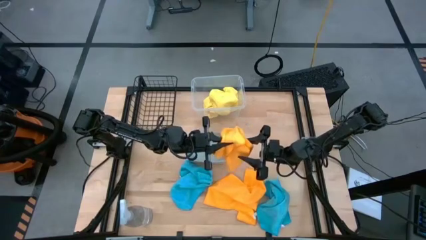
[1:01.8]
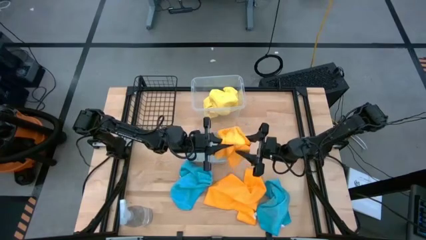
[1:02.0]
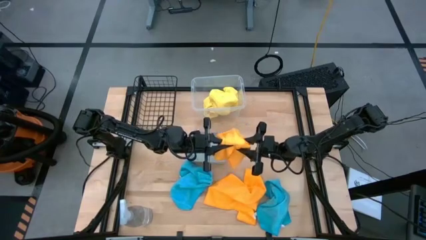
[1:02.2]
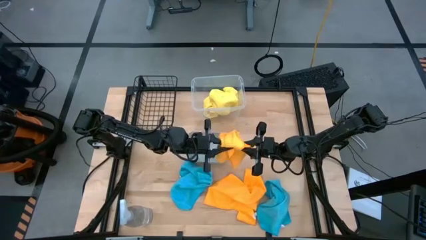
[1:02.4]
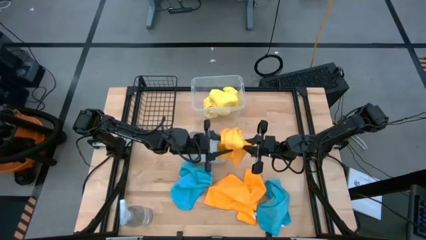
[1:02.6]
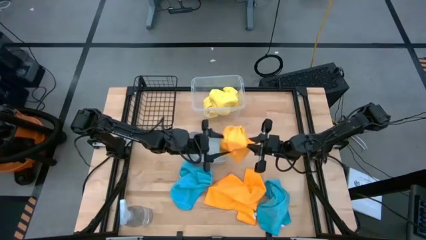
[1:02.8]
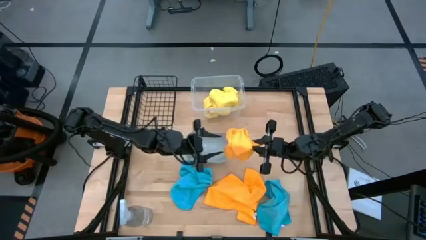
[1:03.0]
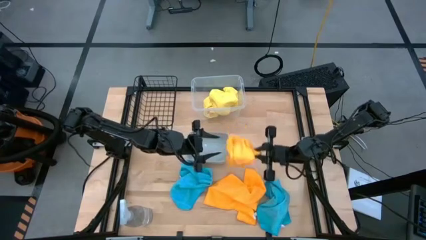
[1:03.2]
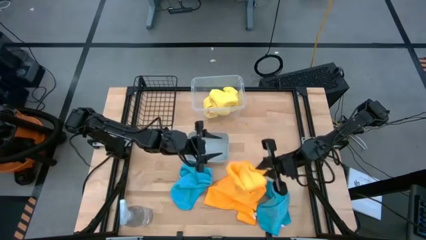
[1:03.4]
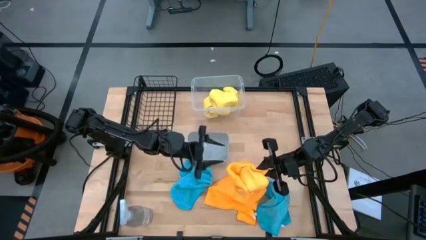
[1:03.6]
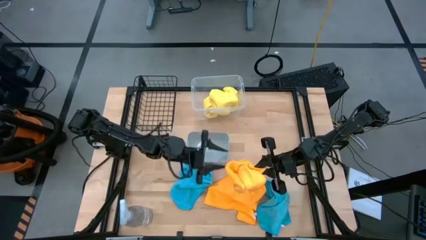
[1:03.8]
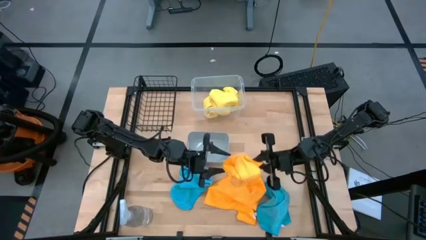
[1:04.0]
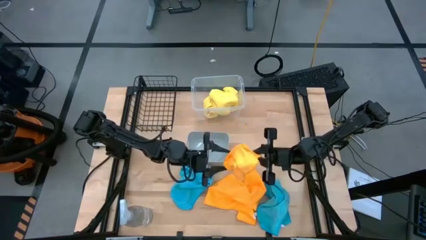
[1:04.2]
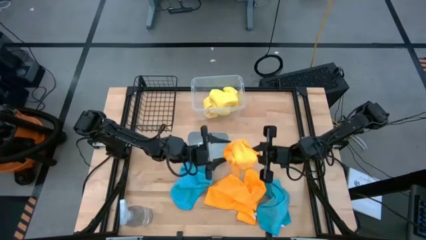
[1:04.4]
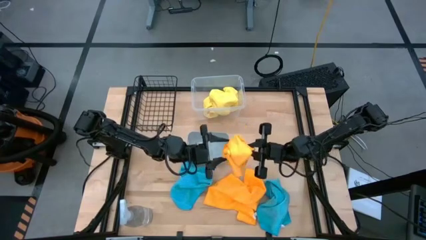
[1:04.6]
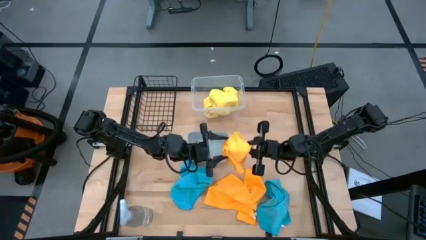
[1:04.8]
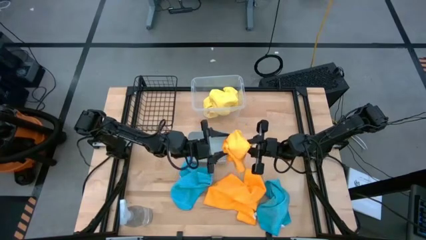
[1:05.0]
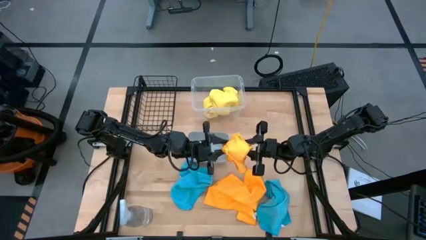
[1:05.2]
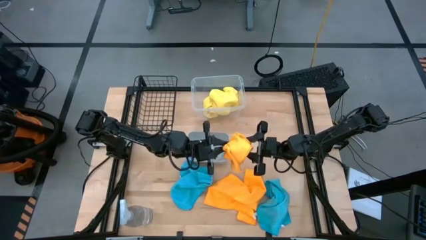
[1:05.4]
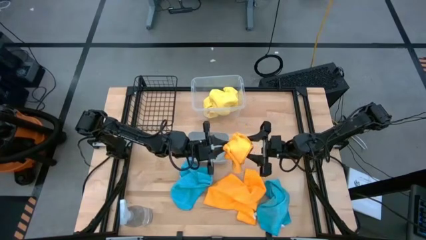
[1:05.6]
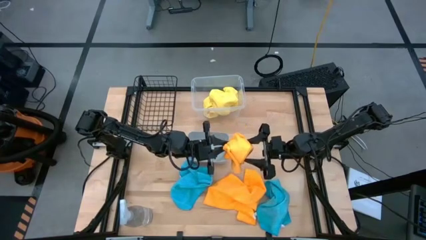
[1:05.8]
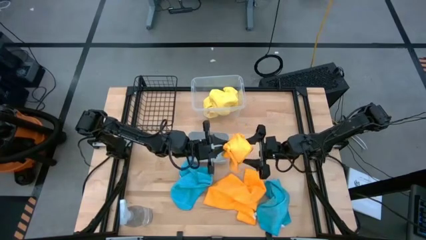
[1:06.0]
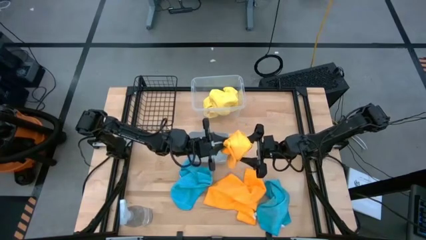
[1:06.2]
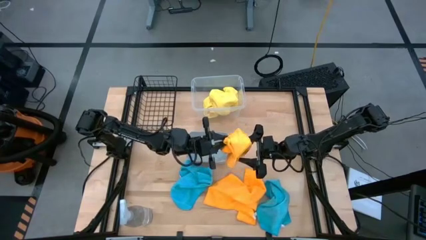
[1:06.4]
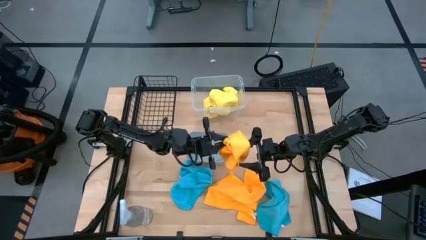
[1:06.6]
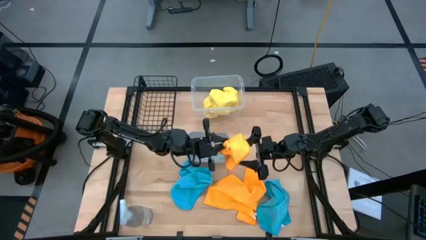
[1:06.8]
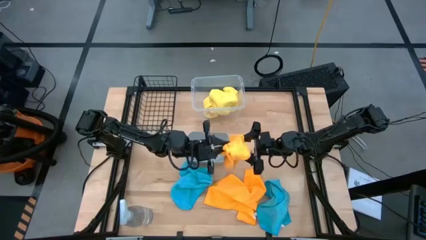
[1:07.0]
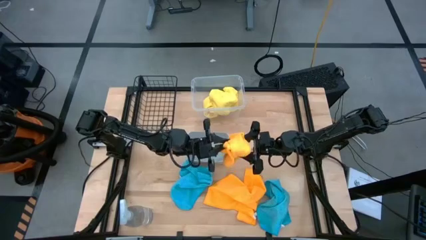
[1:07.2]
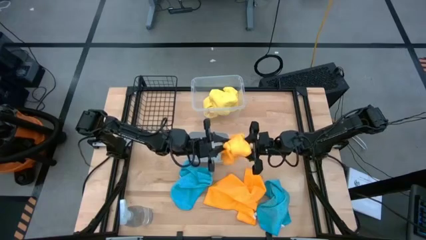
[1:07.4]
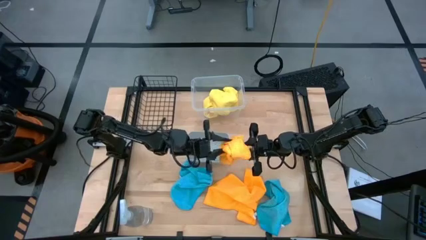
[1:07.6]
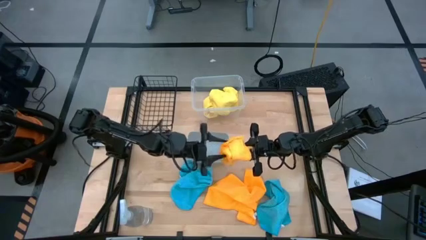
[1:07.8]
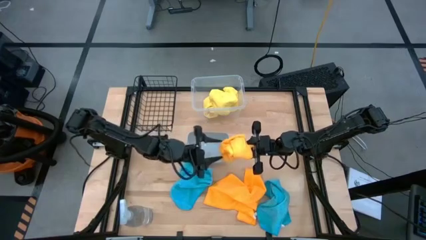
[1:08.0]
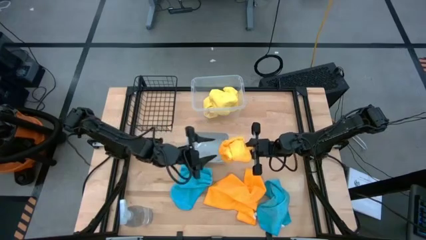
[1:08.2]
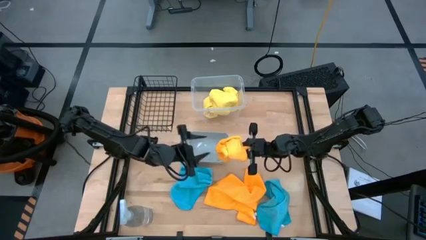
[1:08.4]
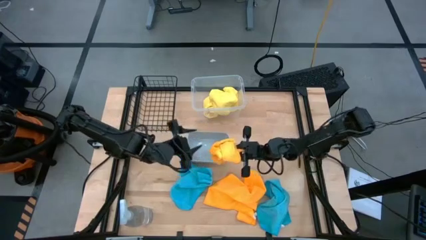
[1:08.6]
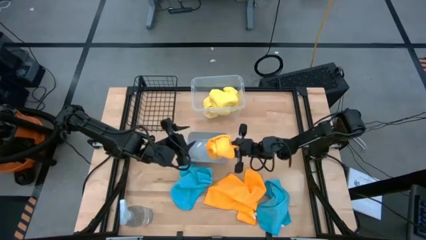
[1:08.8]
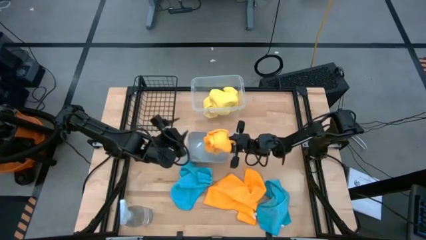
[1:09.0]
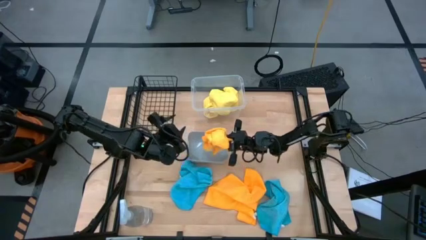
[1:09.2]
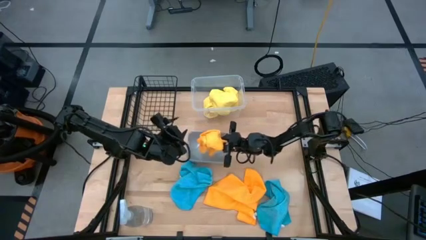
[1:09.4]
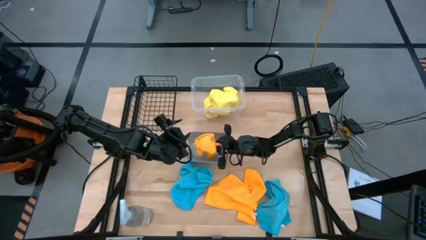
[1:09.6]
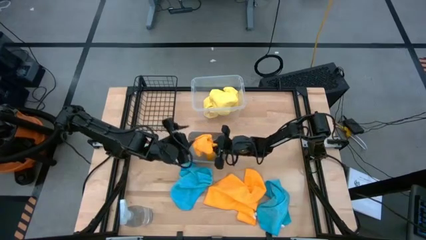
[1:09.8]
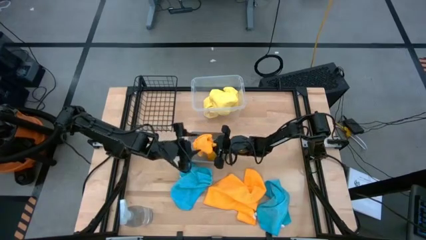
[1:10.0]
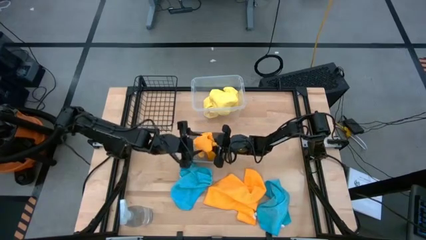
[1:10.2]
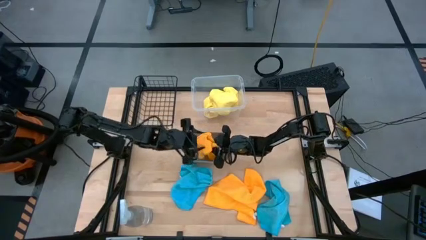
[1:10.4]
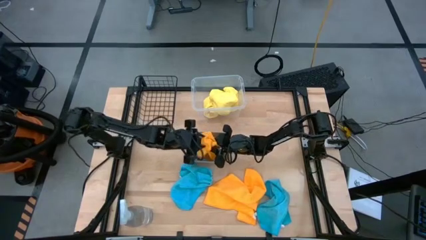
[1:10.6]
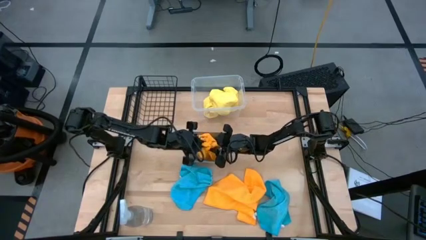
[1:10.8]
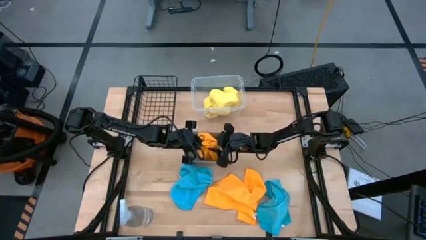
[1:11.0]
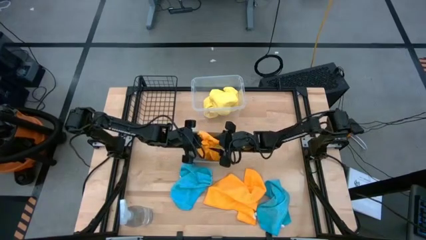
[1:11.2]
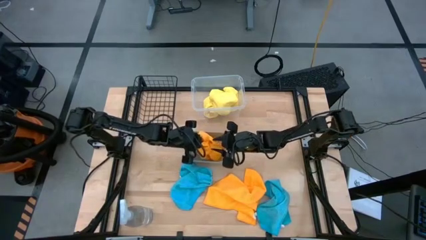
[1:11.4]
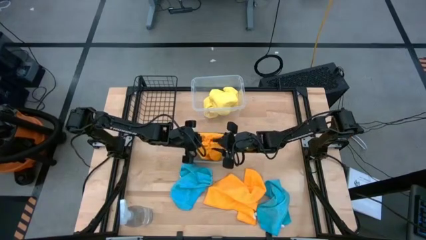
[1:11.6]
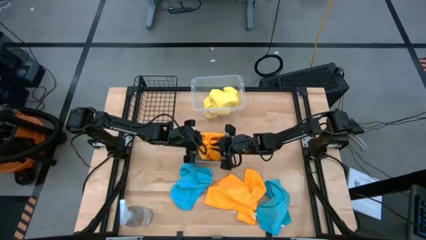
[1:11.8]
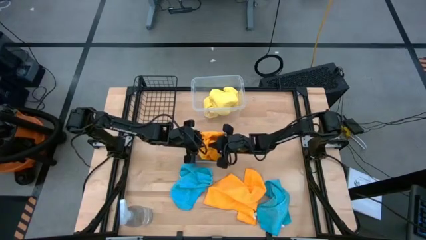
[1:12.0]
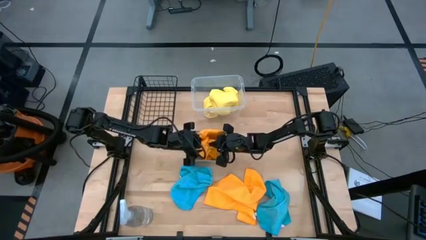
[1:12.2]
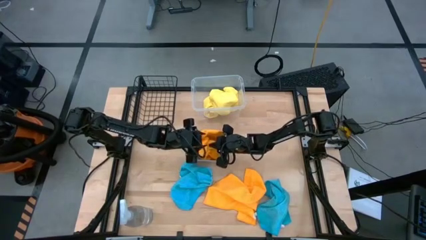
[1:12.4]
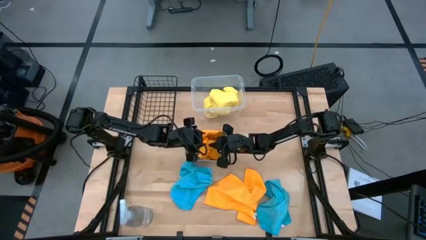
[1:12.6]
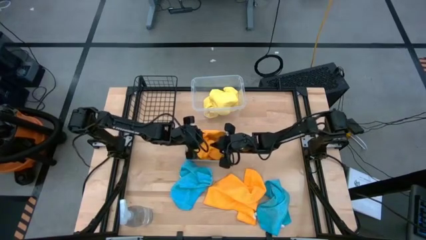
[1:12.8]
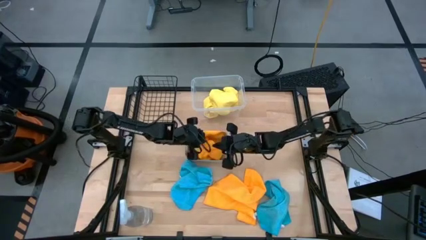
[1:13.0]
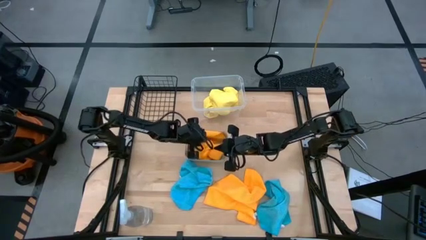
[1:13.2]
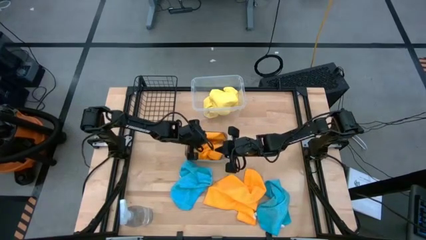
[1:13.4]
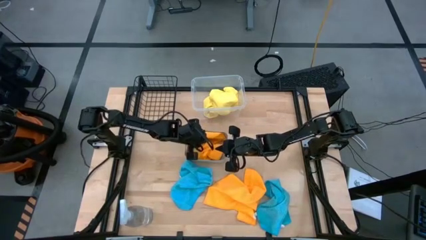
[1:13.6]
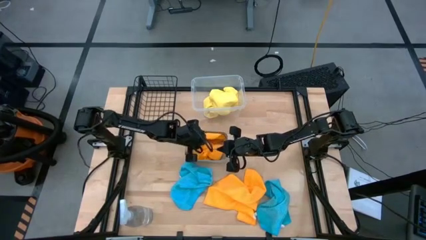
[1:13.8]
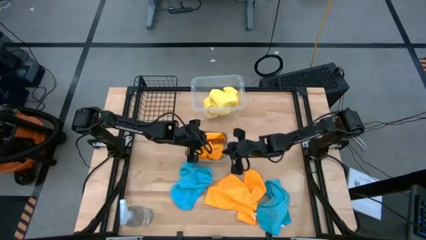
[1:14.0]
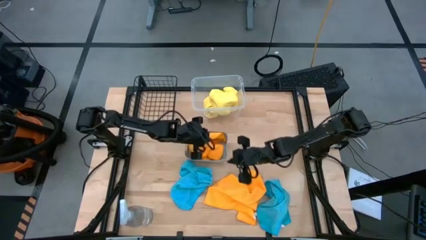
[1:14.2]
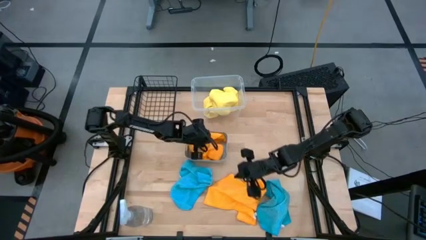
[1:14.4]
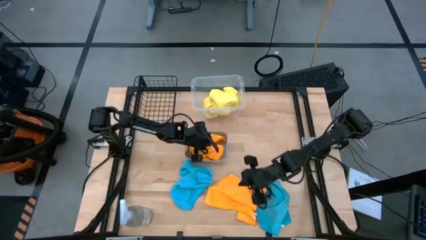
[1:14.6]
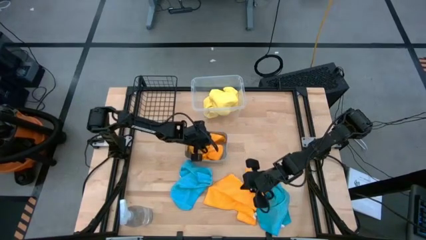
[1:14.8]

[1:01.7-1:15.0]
Task: Sort microfiber towel by color & place in baskets
Put the top orange microfiber cloth into the gray bin

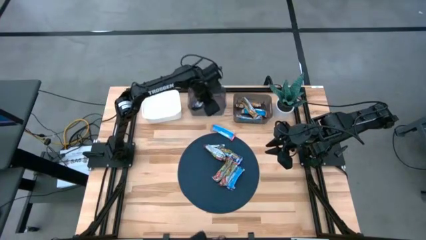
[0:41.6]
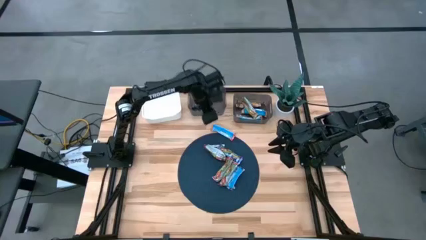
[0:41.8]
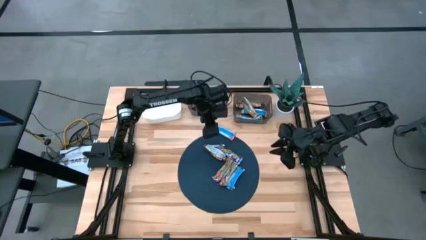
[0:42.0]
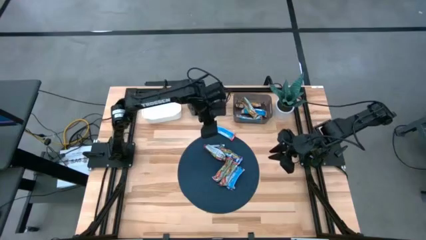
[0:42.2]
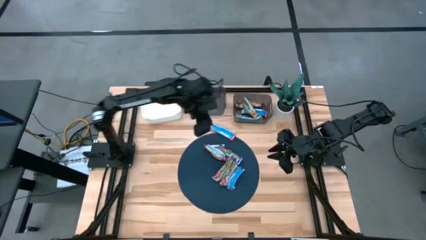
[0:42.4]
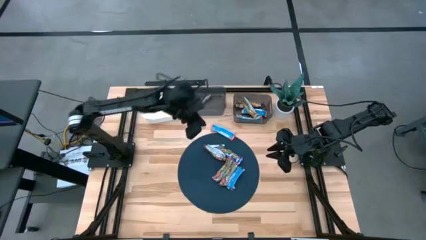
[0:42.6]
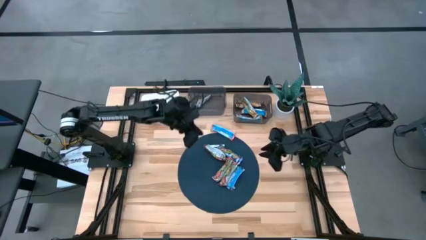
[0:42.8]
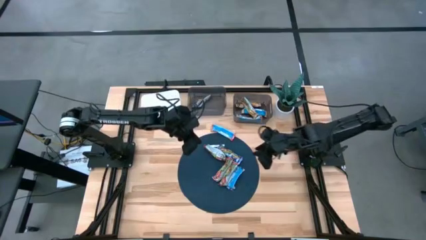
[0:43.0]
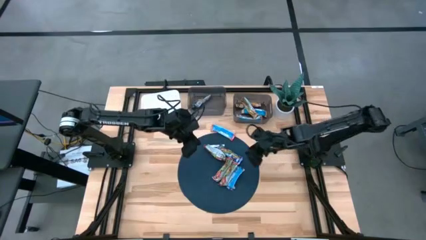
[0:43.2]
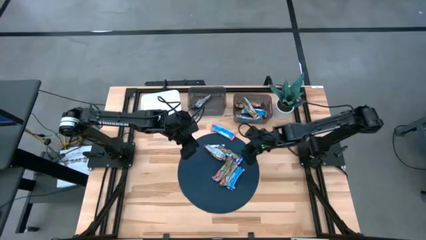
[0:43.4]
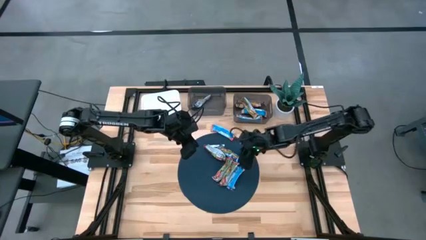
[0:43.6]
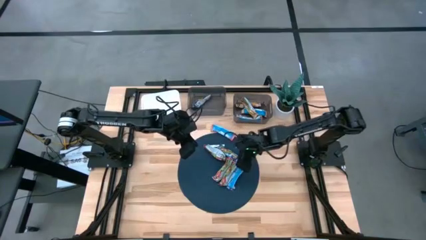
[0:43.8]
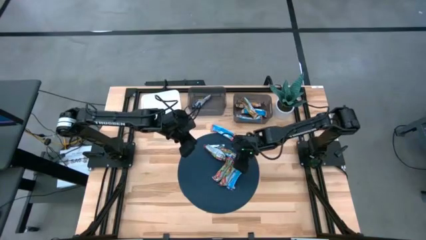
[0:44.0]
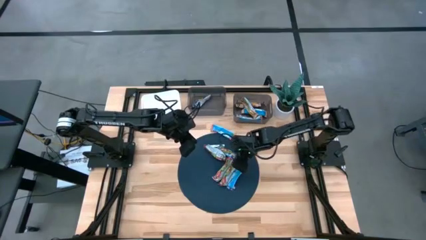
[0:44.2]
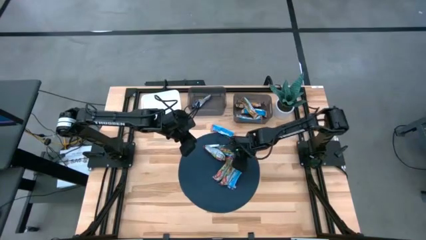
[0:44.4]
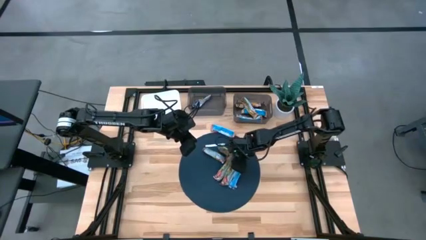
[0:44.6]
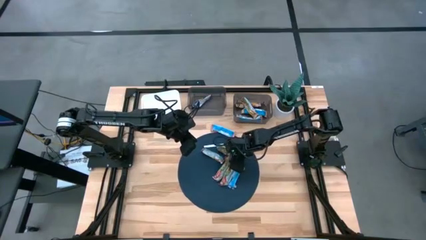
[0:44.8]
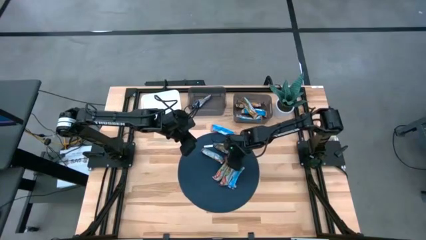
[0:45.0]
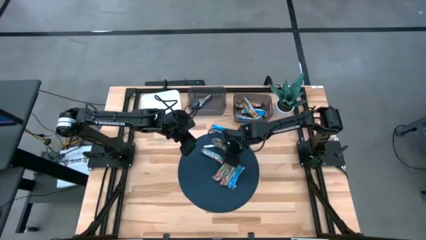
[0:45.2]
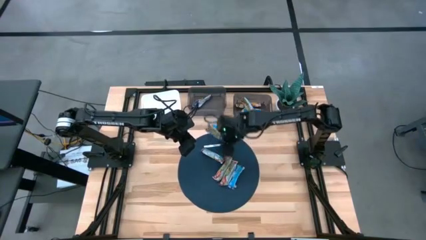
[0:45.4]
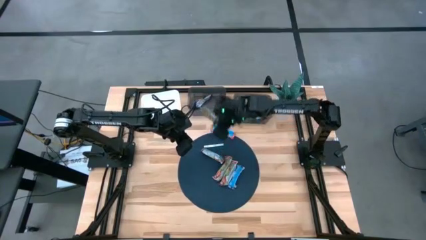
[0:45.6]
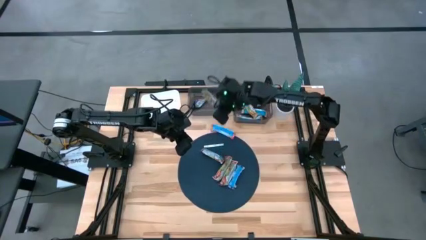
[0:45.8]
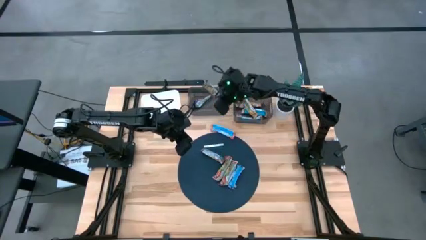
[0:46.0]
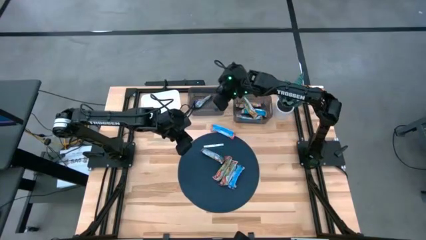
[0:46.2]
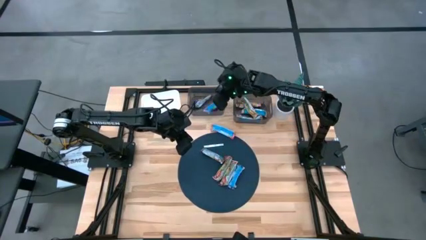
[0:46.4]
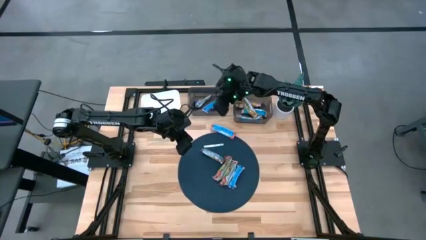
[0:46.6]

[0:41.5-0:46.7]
Task: Pick and place Granola Bars by type
Put the blue granola bar into the middle black bin
